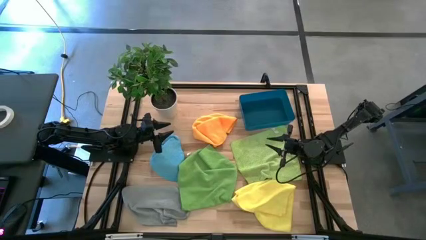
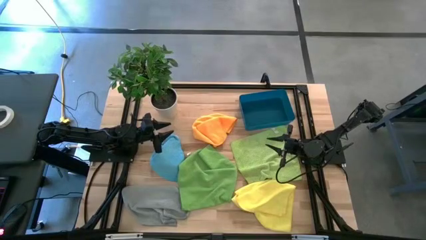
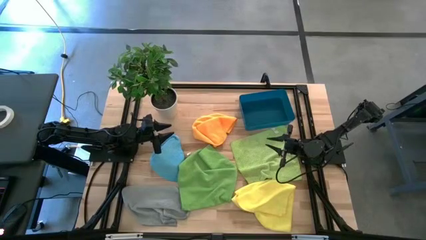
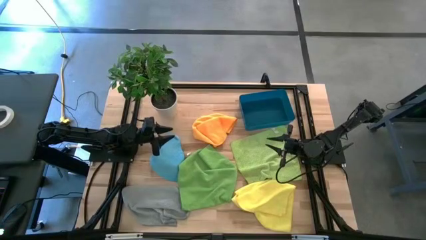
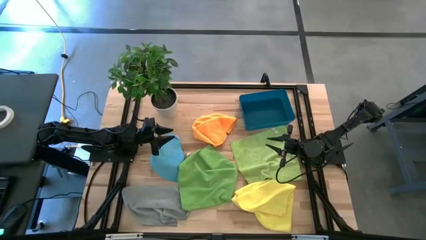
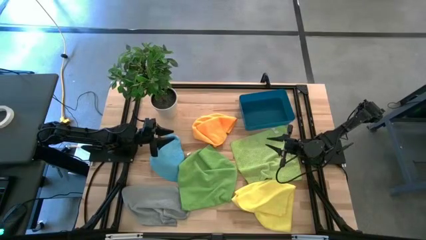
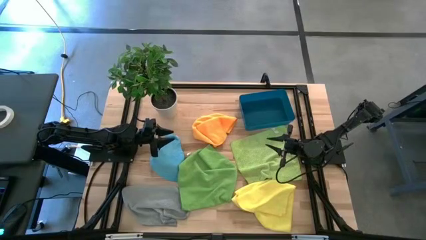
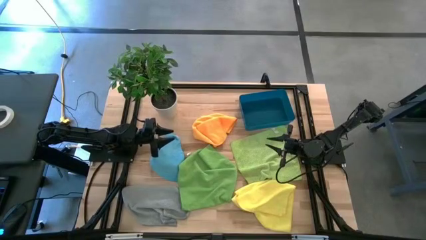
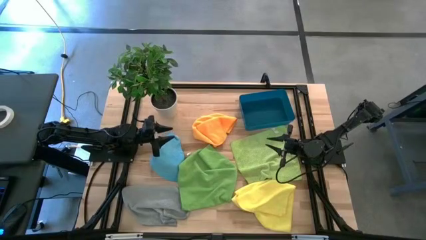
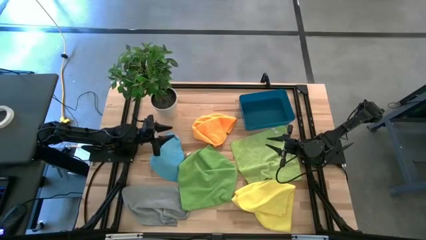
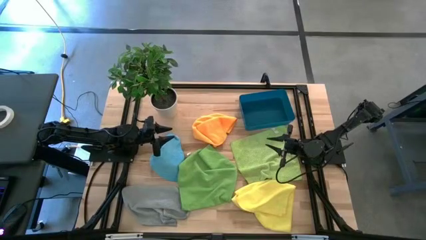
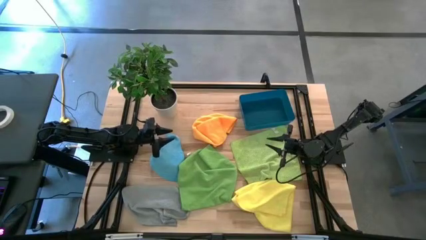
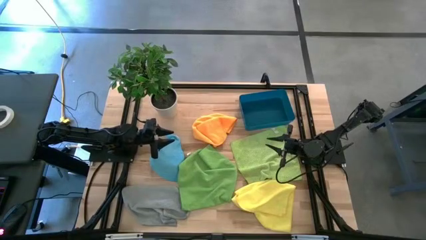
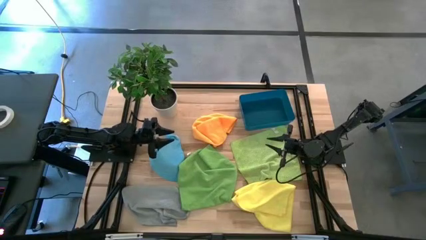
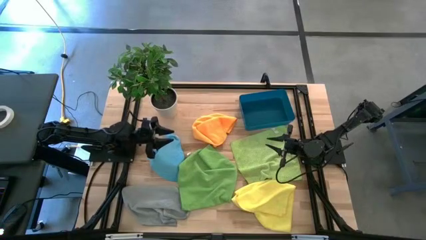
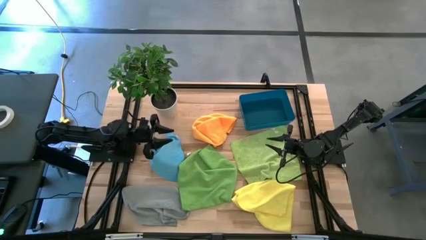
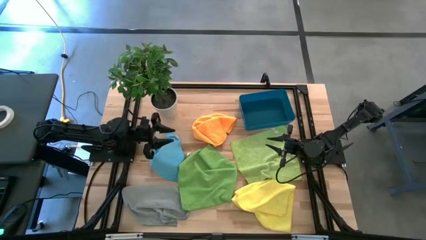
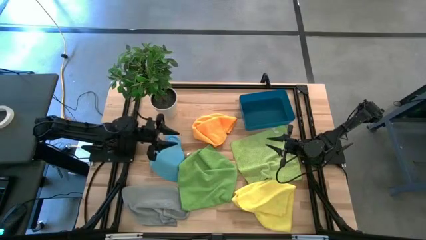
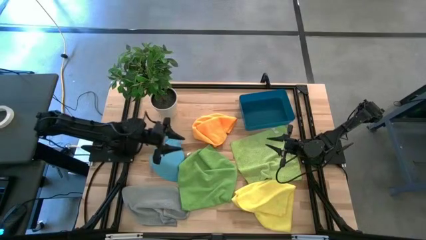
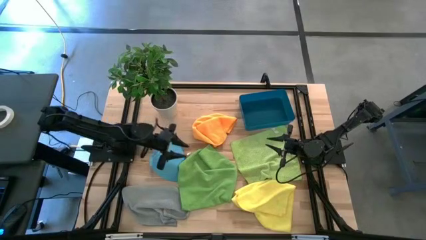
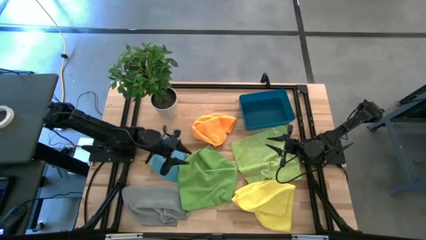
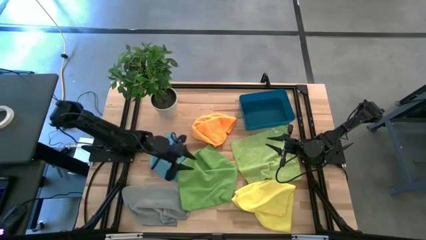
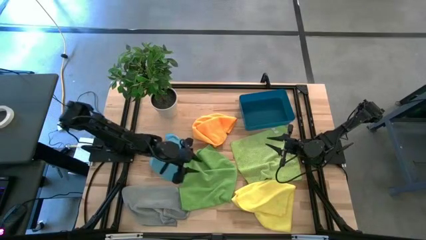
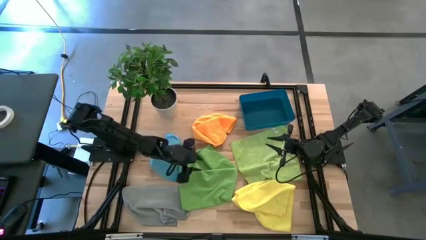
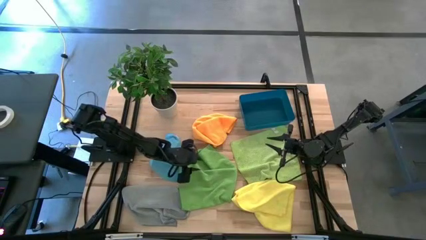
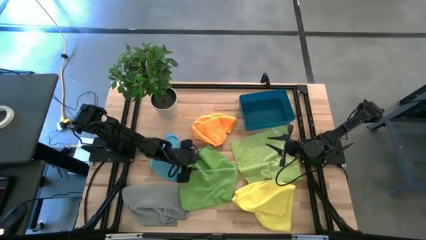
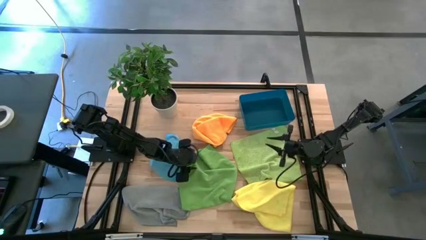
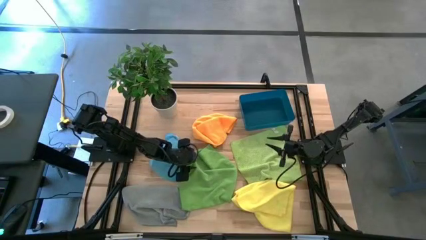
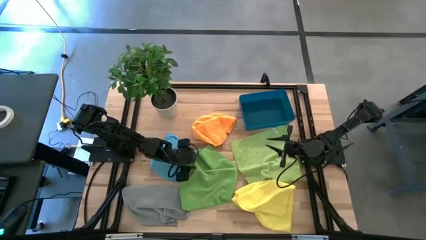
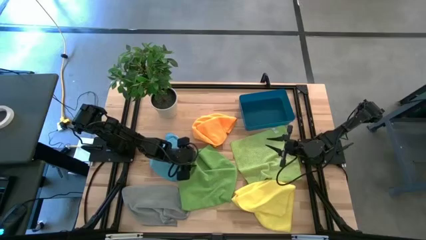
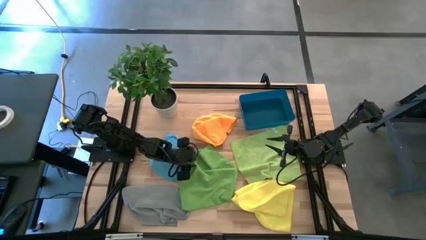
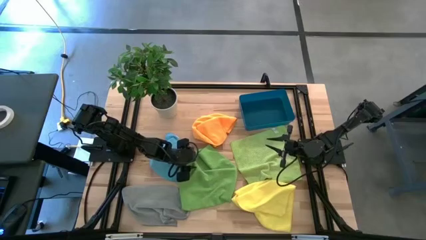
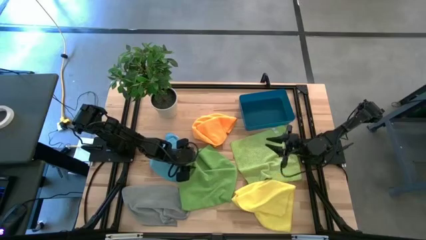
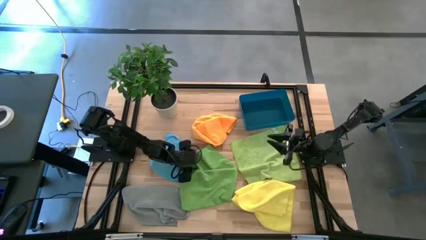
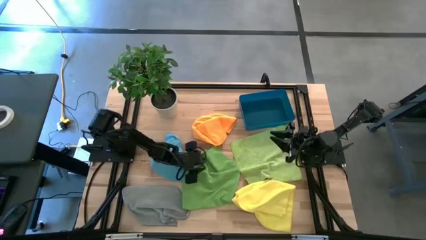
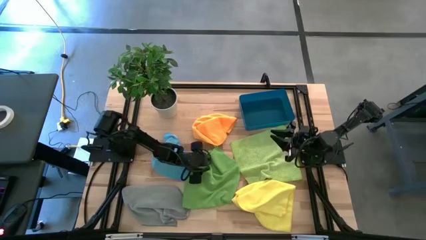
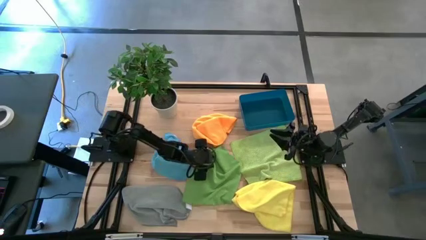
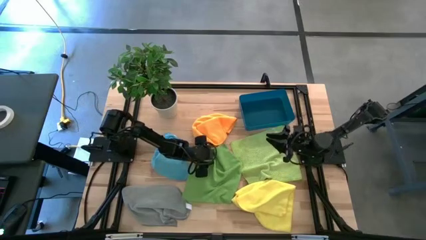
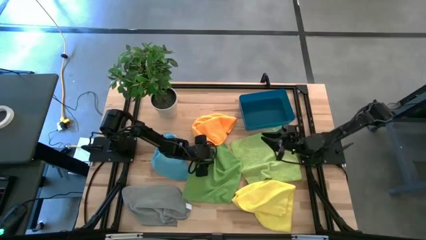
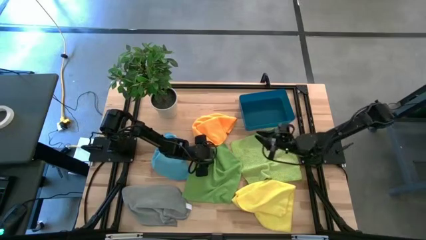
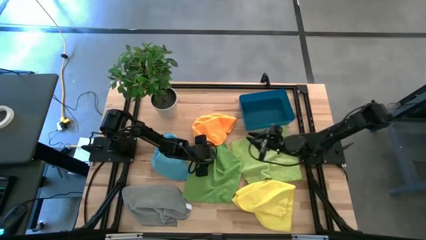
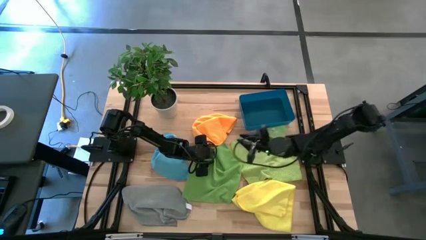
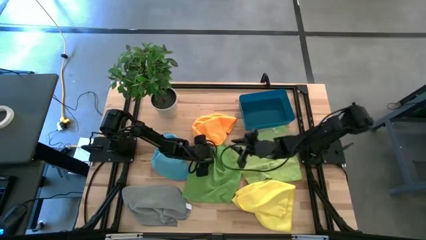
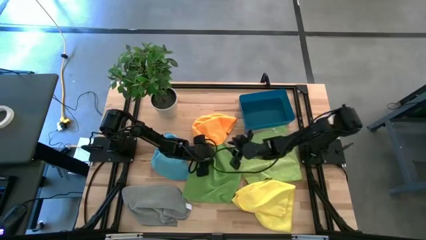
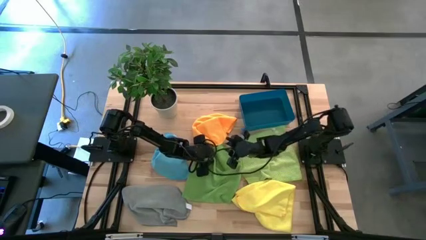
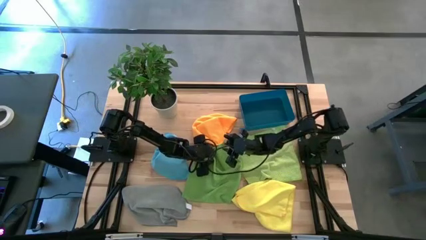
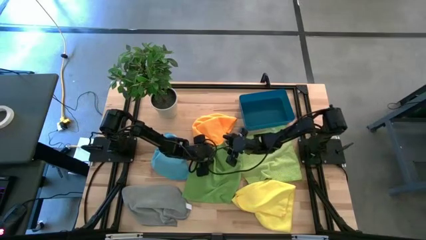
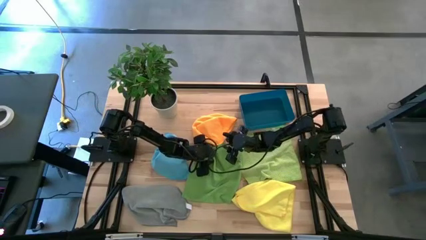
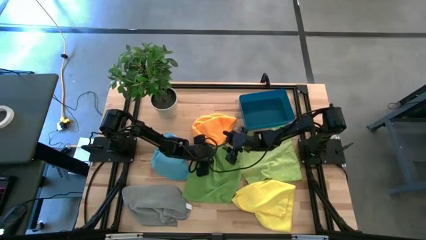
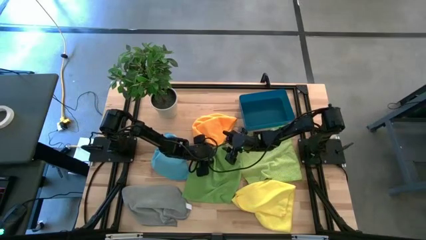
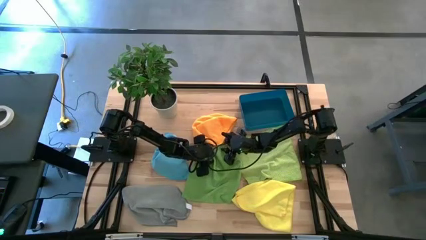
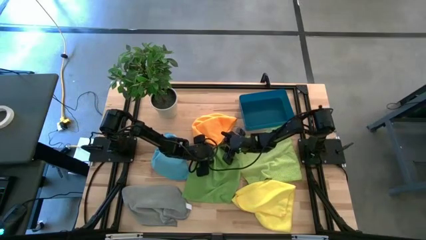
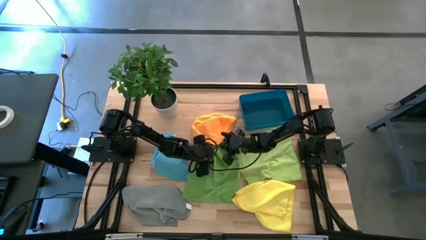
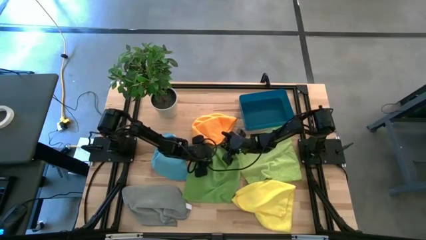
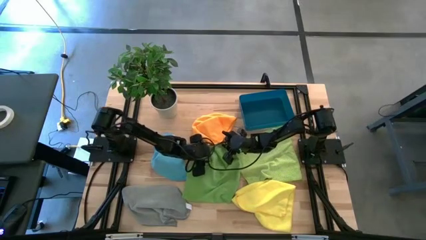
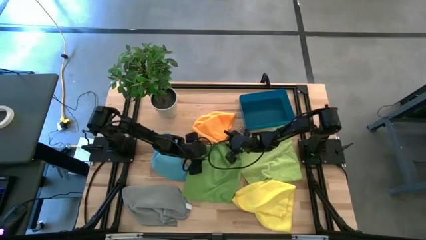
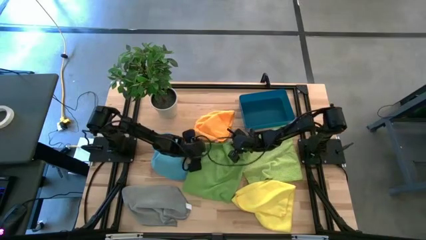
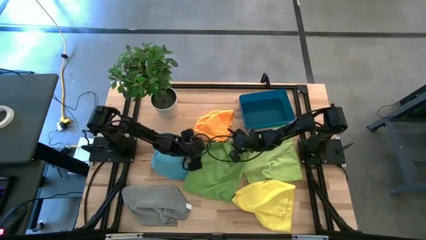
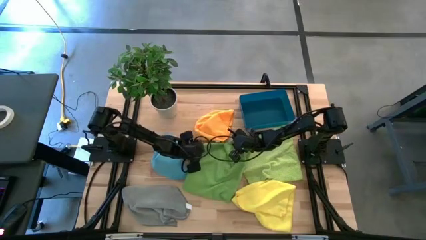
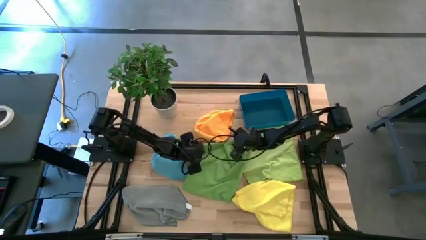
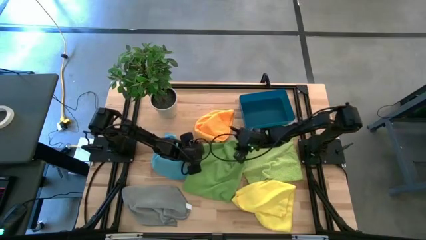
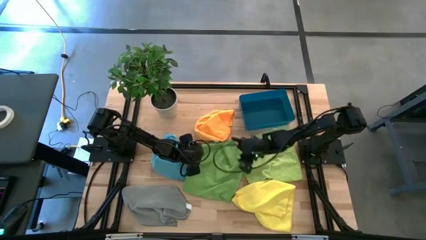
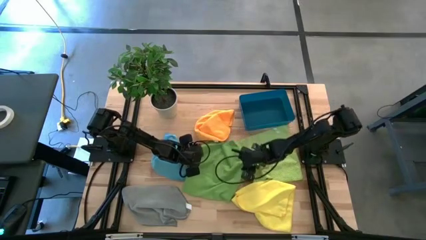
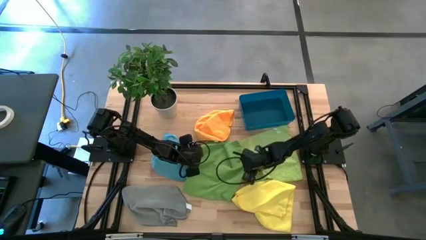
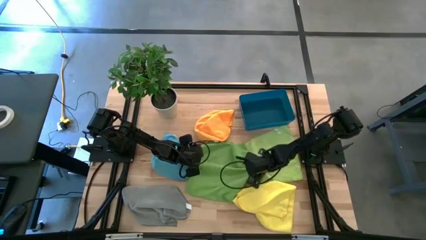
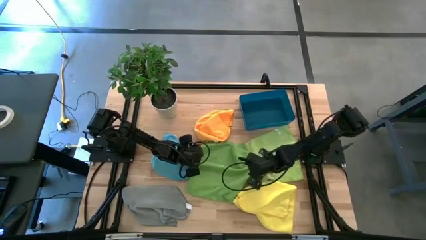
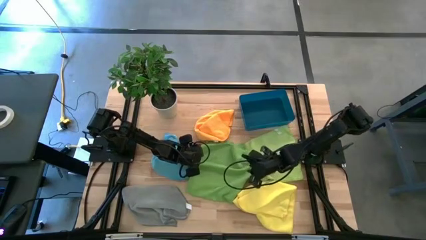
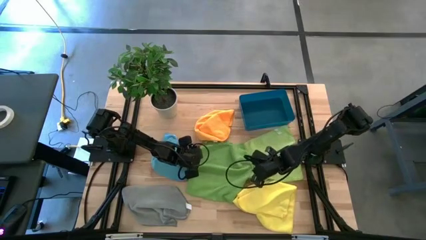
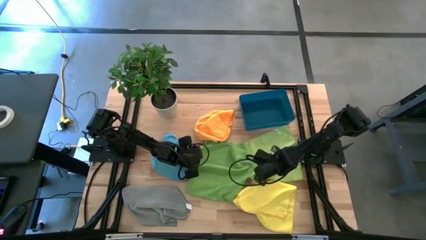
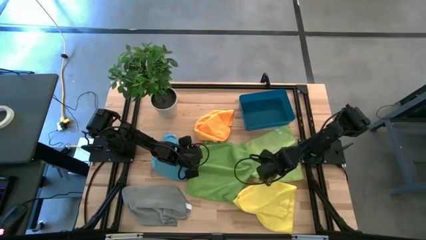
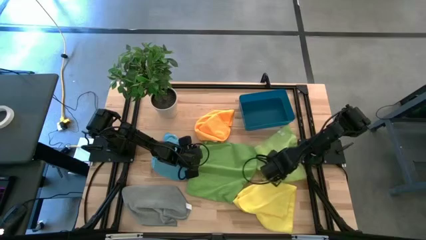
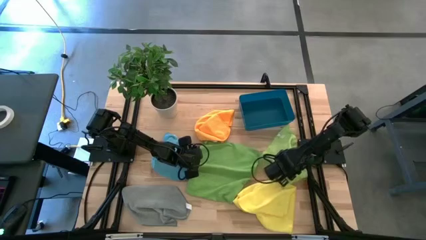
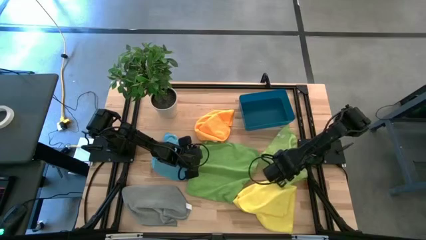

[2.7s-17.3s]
Task: Fold microfiber towels
Move the light green microfiber cloth to the middle right of the table

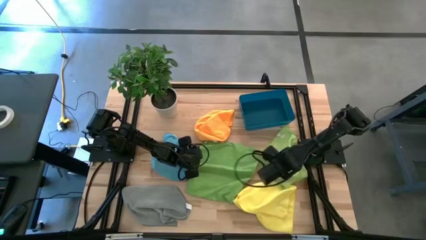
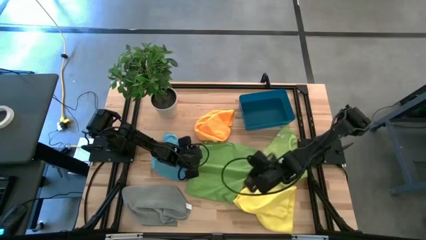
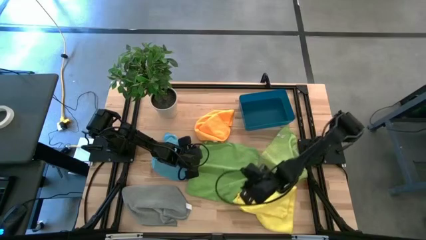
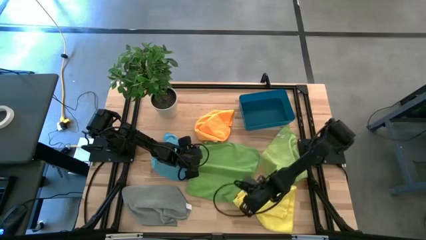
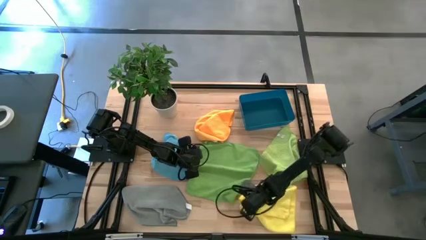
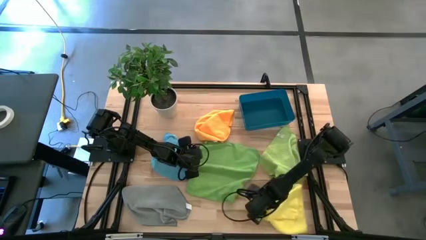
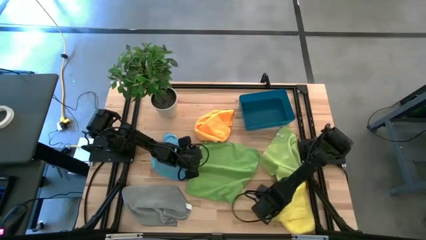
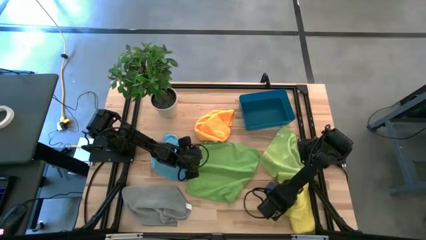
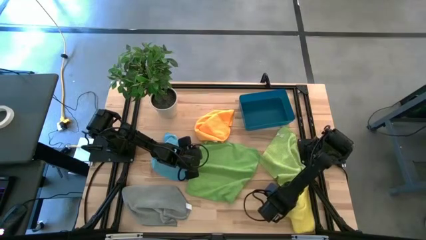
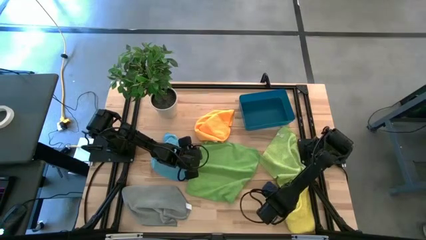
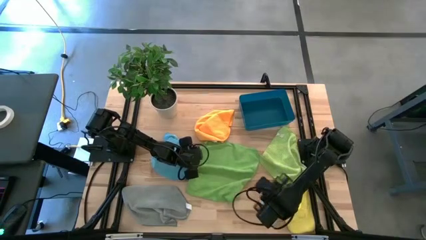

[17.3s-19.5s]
Move the yellow microfiber cloth to the bottom right of the table
